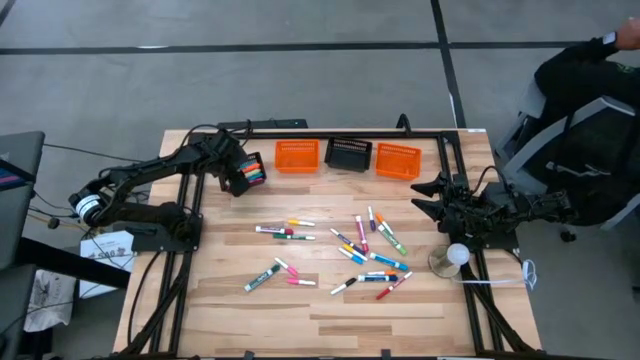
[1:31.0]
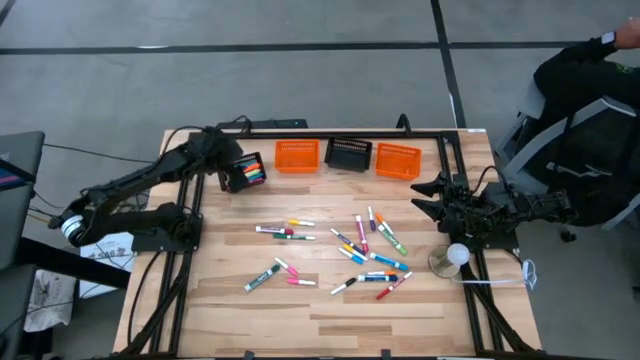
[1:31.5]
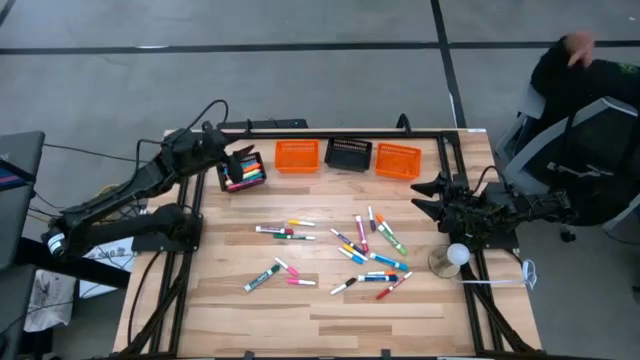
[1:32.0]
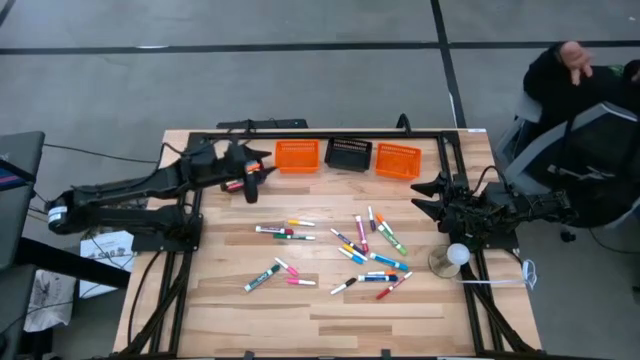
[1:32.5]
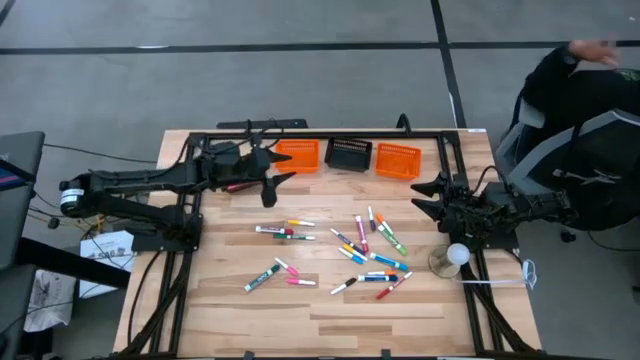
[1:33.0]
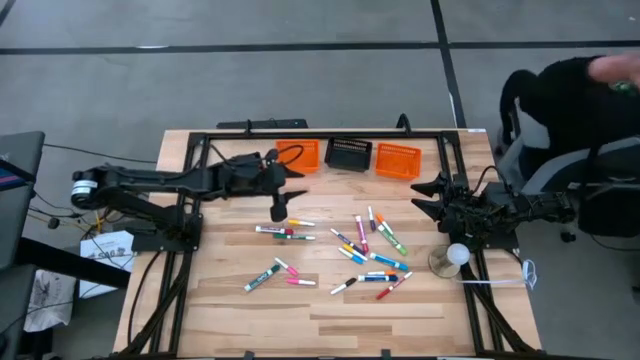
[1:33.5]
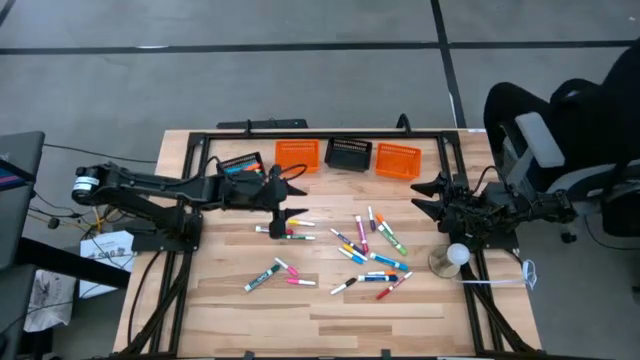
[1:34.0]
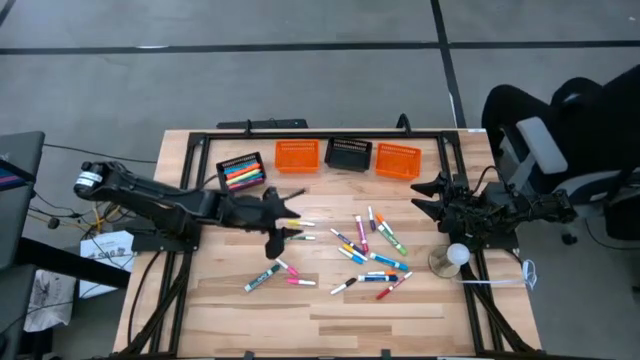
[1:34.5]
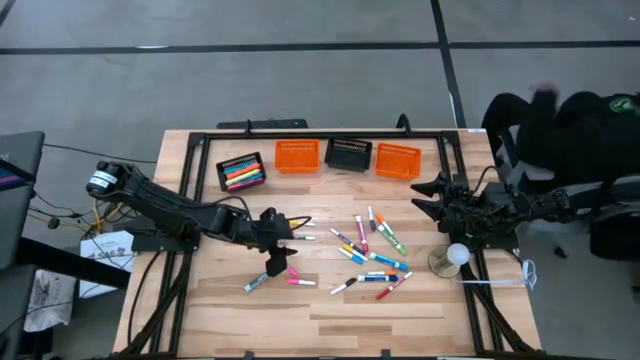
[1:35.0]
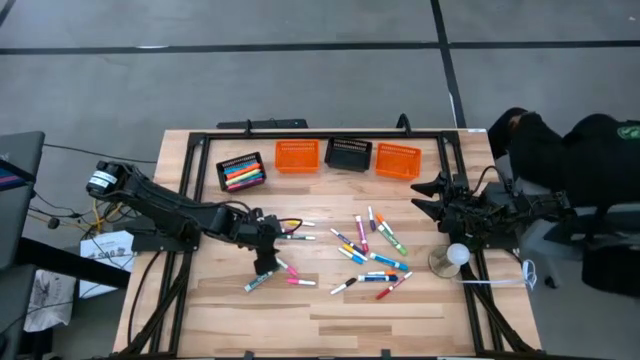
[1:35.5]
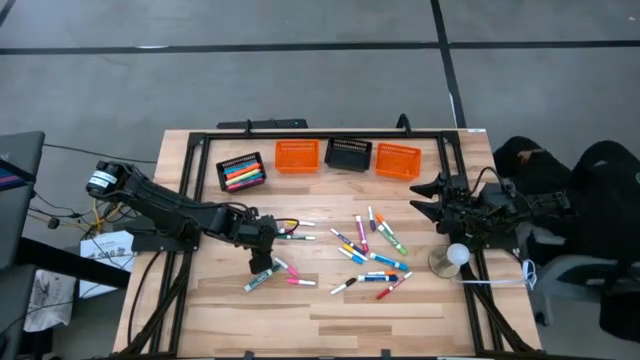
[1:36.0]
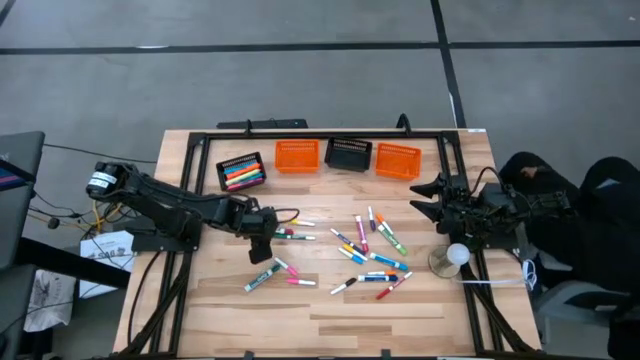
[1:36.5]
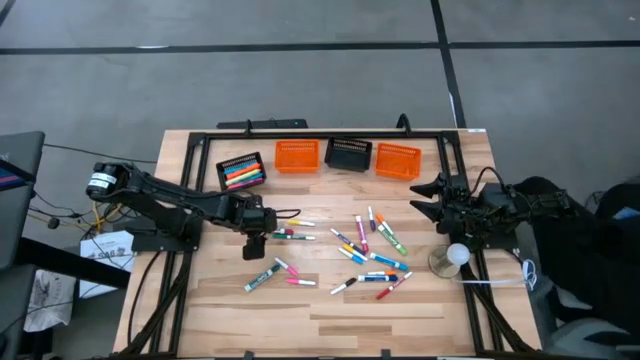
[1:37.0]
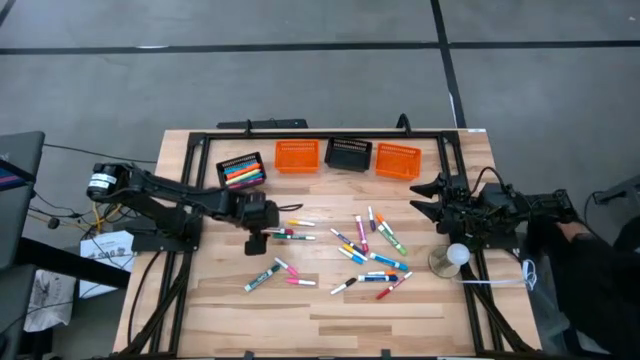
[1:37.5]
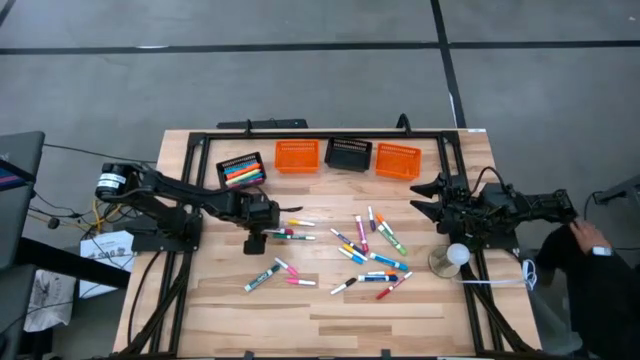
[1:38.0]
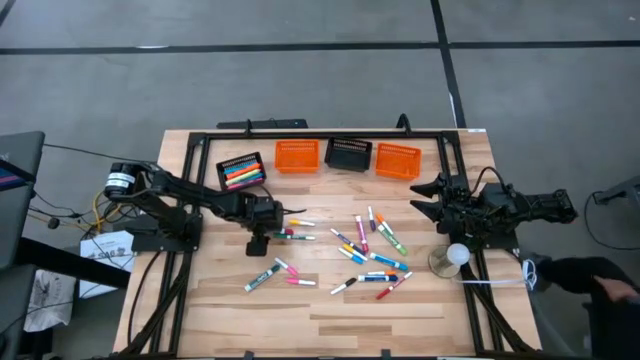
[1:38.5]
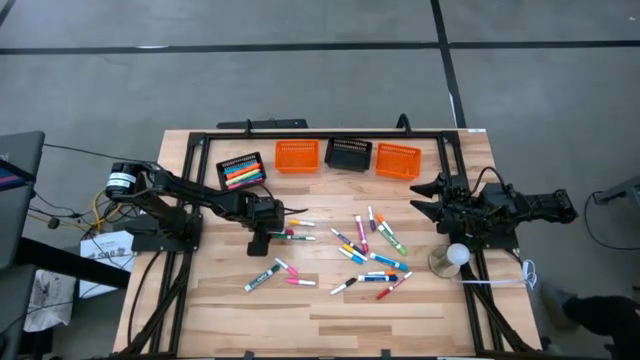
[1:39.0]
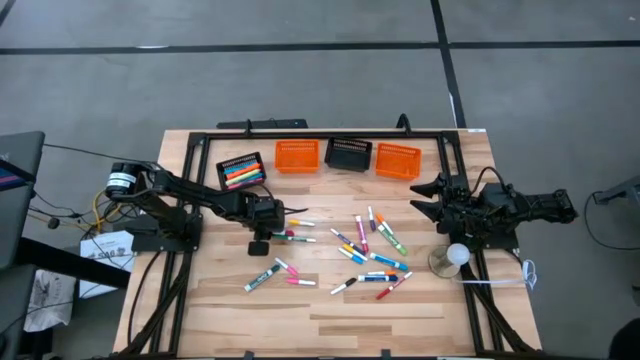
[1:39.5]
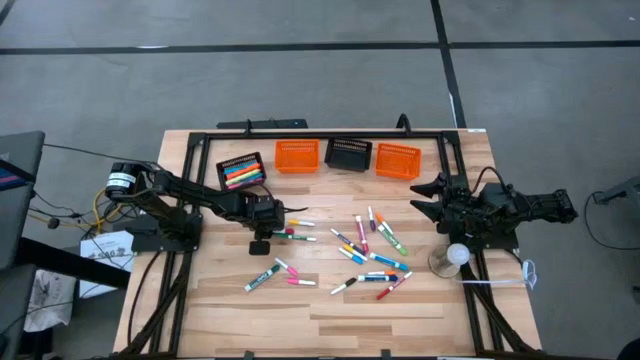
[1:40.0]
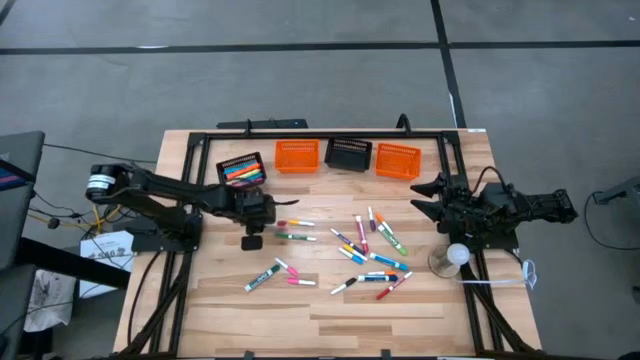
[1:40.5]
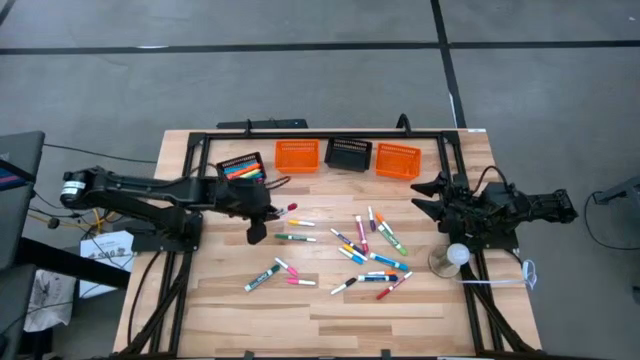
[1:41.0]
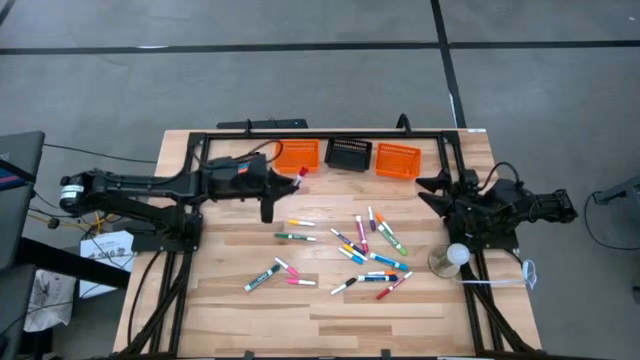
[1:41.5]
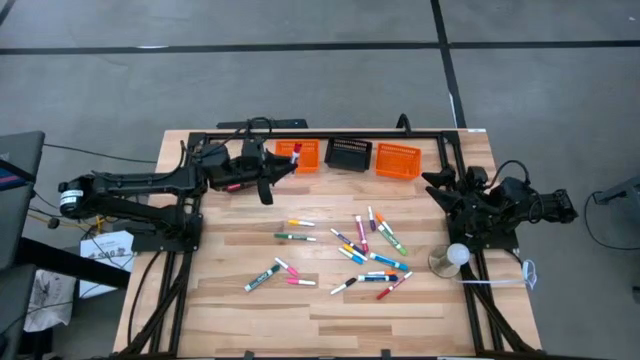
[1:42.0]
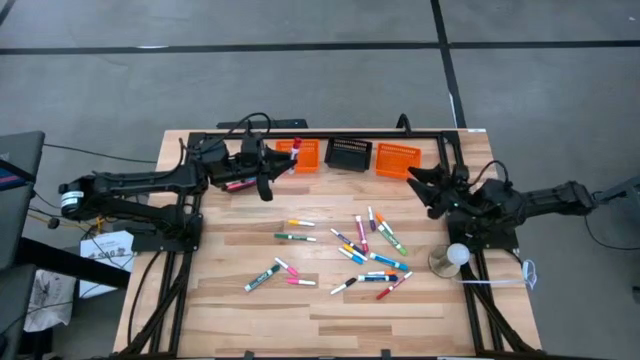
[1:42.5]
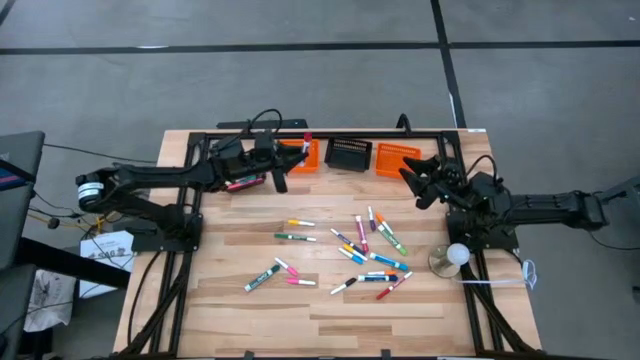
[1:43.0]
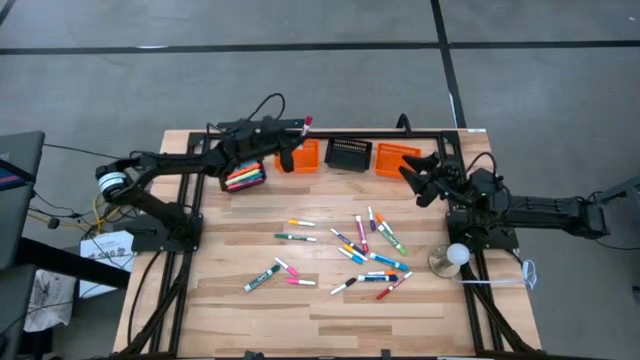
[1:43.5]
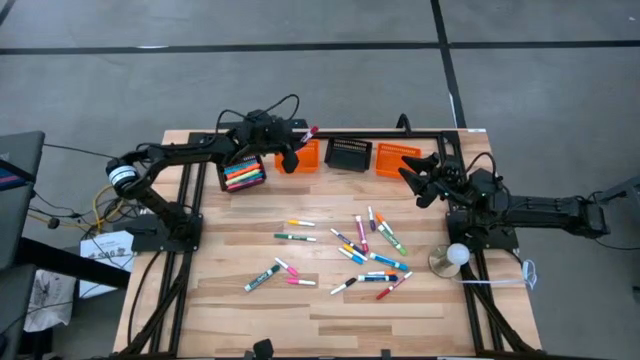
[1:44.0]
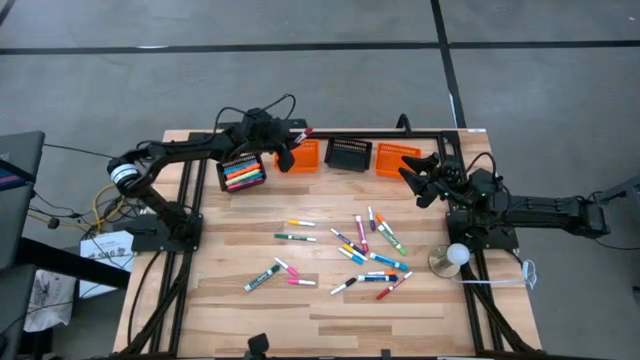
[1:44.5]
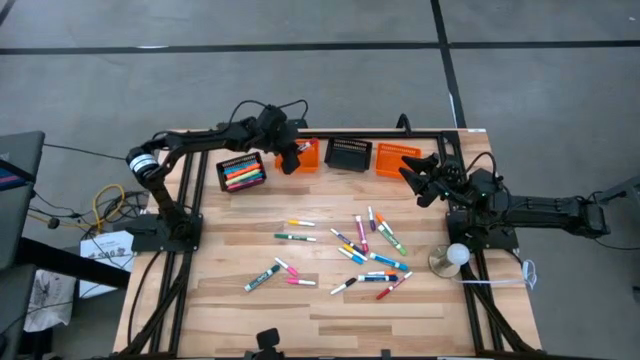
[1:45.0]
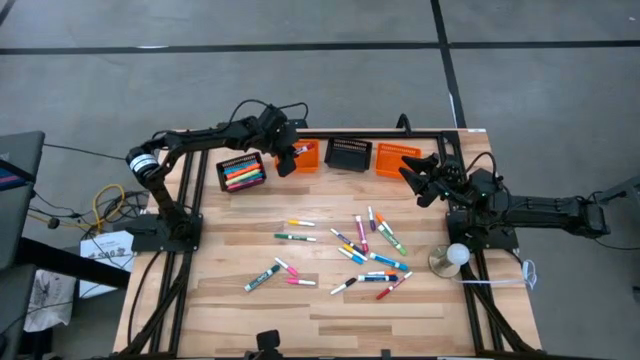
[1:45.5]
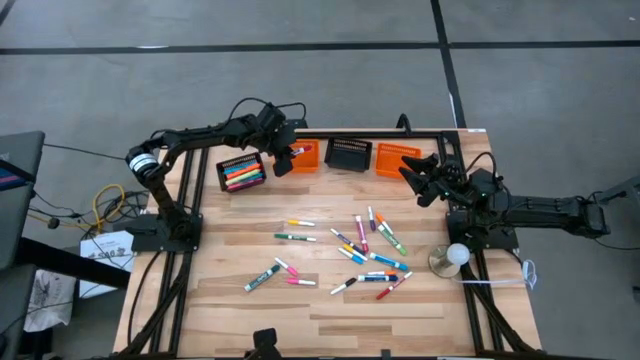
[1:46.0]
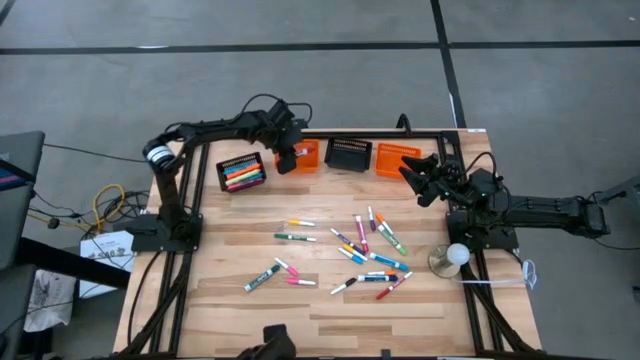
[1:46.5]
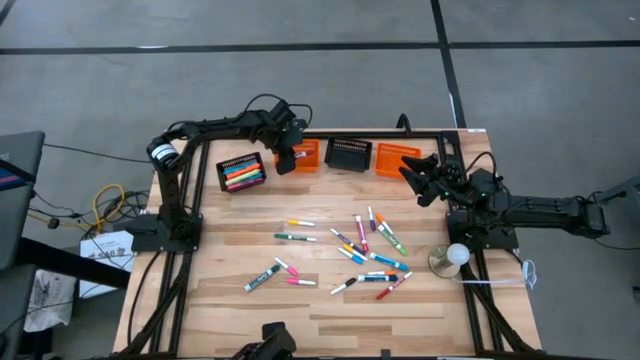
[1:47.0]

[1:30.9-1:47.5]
Task: Pick & Place Markers
Put the large red marker pen into the left orange bin

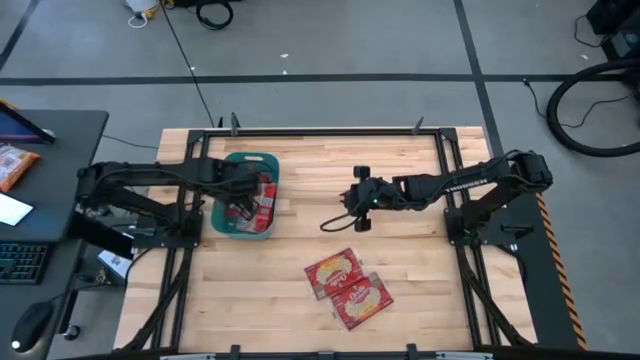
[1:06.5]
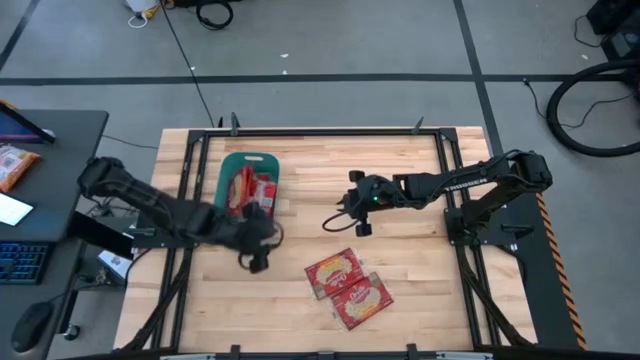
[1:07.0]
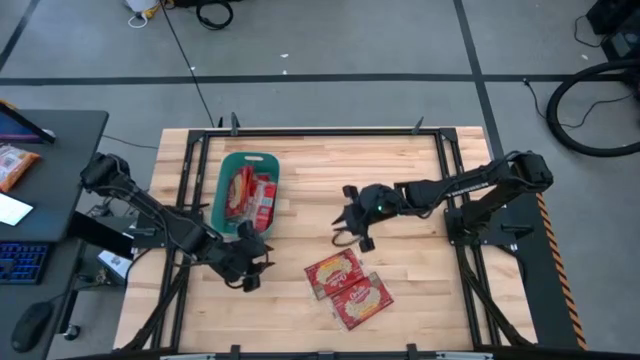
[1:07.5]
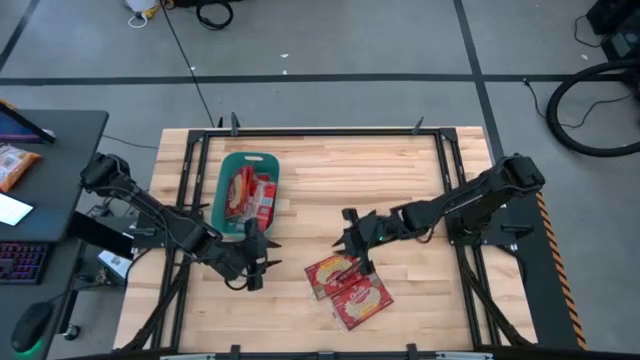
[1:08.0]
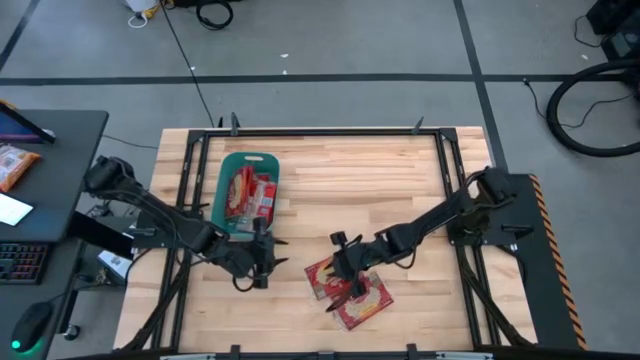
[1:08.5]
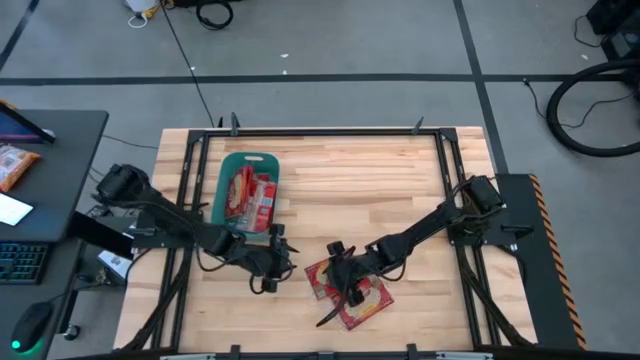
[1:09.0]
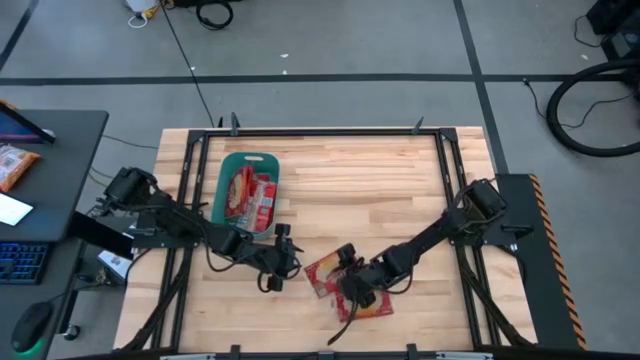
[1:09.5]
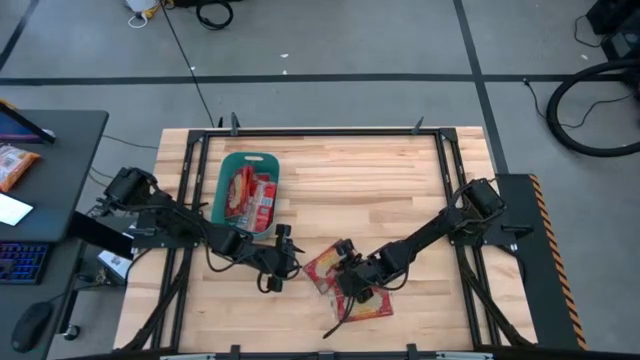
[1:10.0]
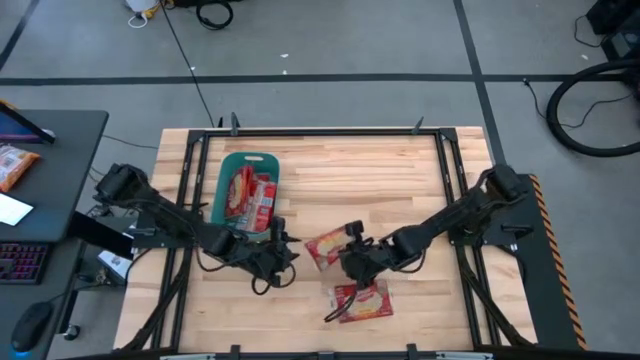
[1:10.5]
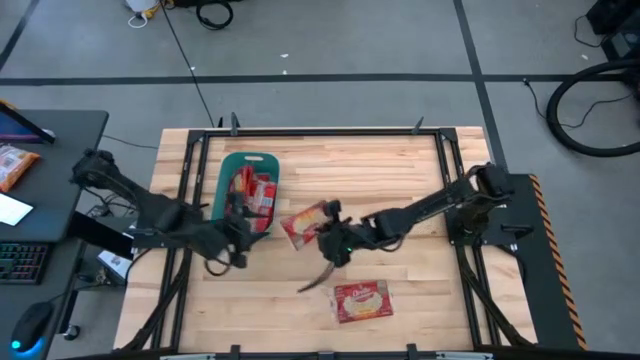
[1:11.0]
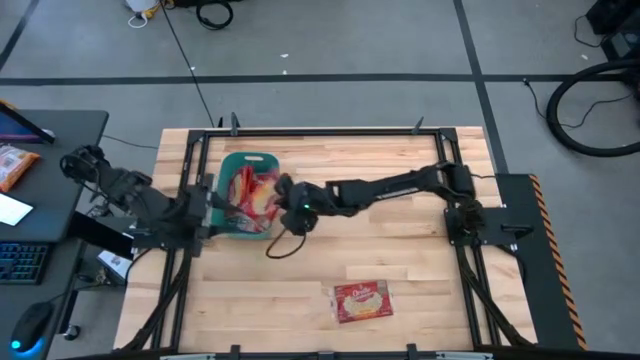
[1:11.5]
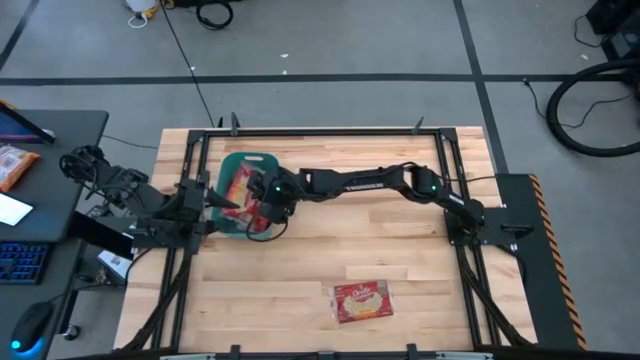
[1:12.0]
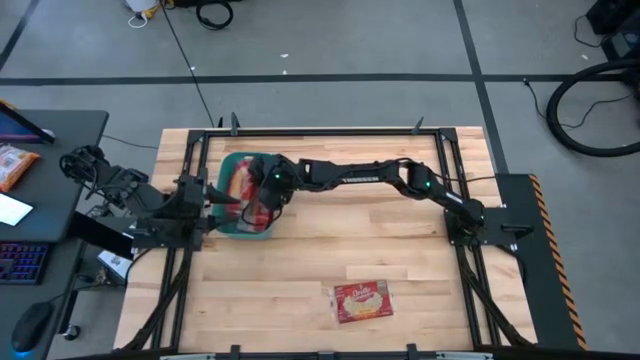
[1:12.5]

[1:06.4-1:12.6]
Task: Sort popcorn bags into baskets
Put the red popcorn bag into the green bin
